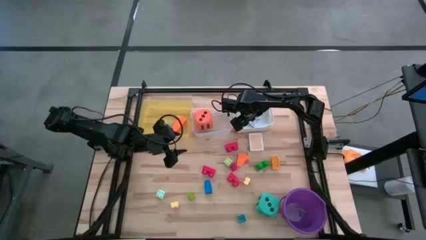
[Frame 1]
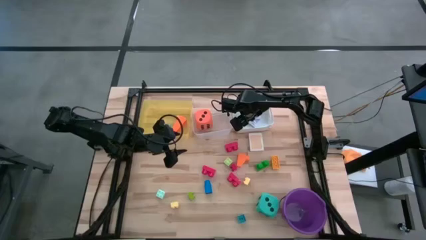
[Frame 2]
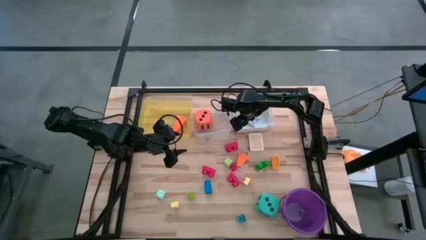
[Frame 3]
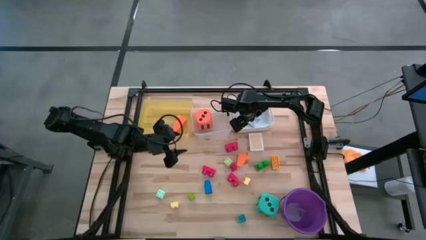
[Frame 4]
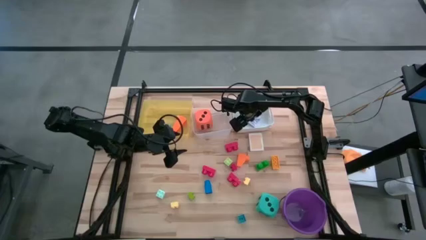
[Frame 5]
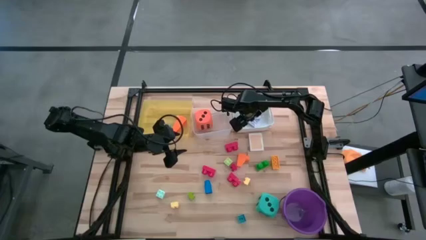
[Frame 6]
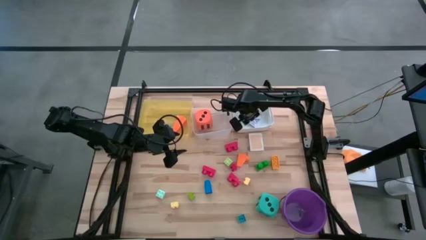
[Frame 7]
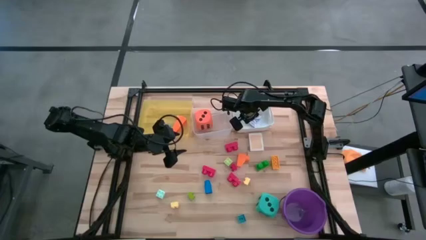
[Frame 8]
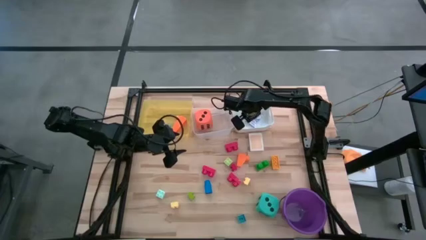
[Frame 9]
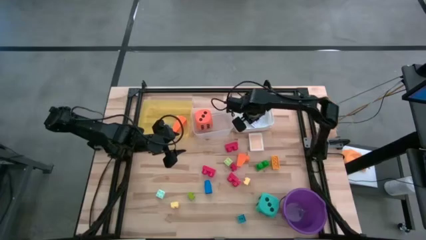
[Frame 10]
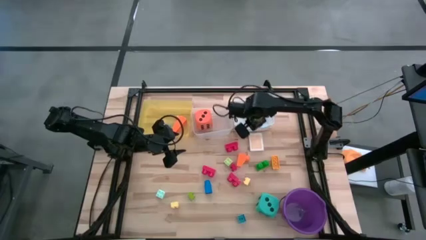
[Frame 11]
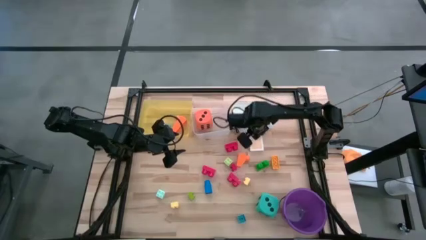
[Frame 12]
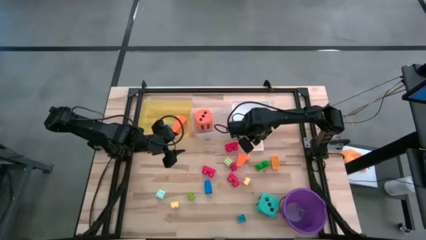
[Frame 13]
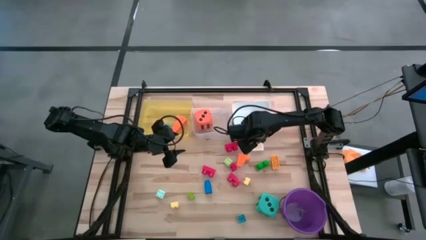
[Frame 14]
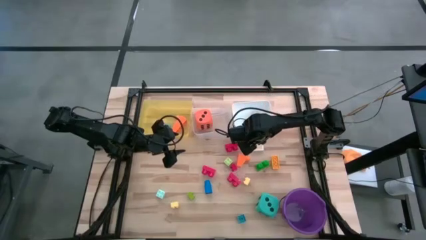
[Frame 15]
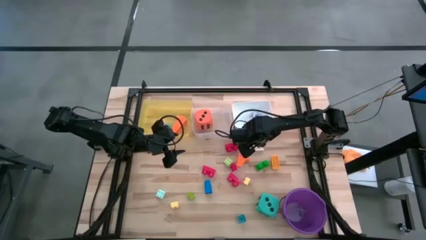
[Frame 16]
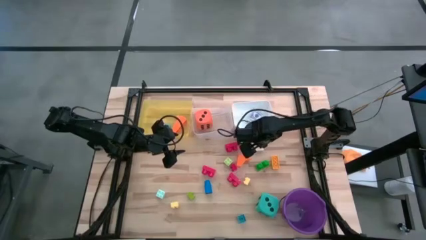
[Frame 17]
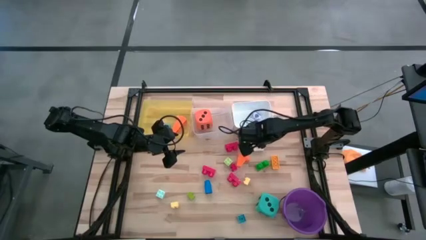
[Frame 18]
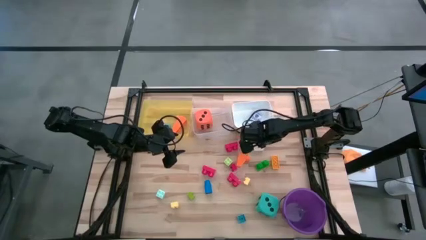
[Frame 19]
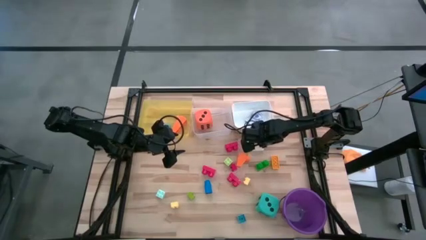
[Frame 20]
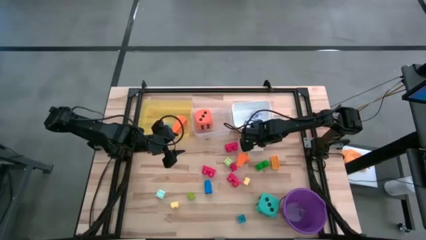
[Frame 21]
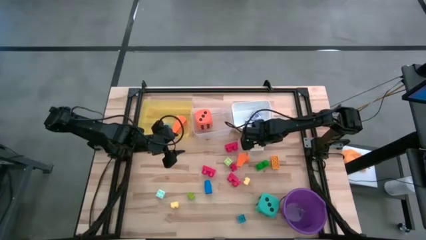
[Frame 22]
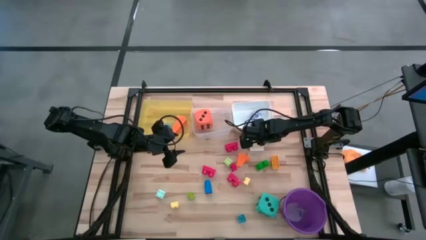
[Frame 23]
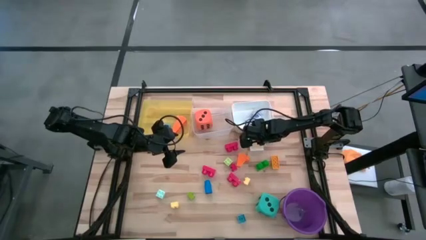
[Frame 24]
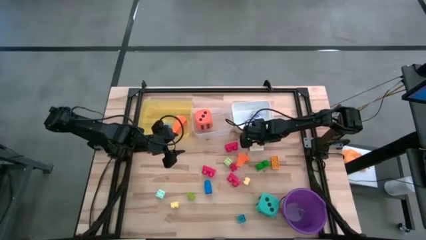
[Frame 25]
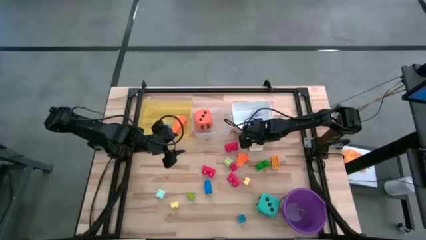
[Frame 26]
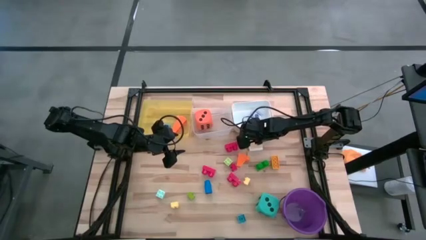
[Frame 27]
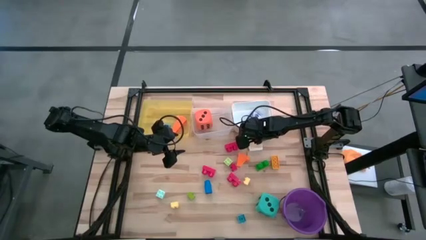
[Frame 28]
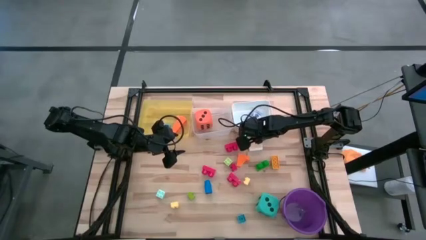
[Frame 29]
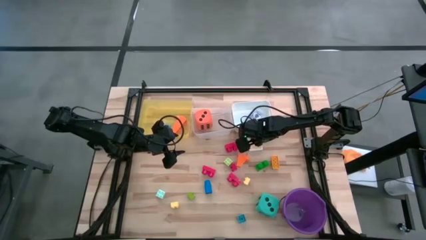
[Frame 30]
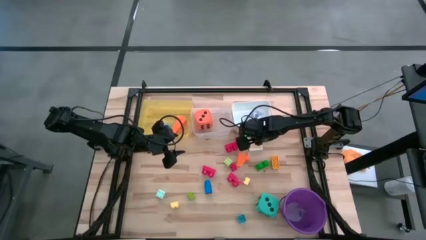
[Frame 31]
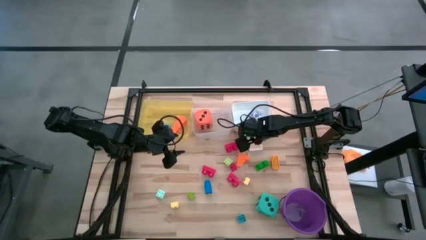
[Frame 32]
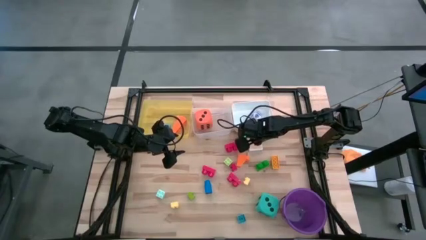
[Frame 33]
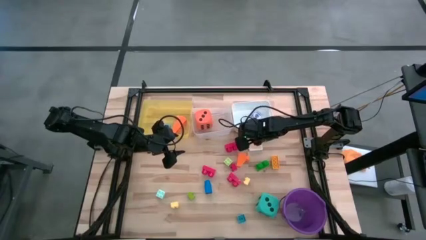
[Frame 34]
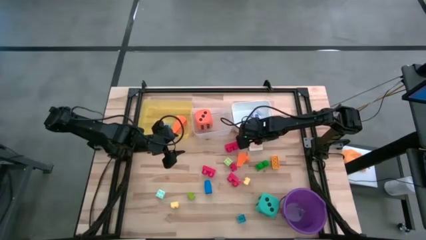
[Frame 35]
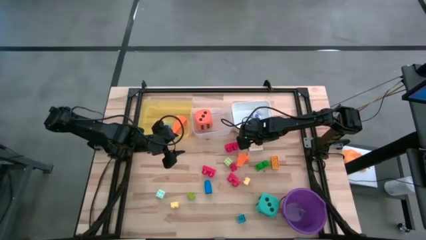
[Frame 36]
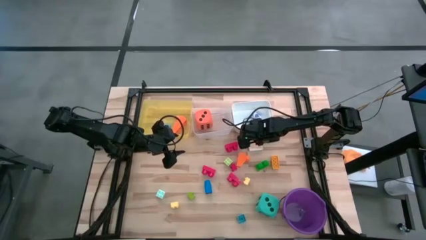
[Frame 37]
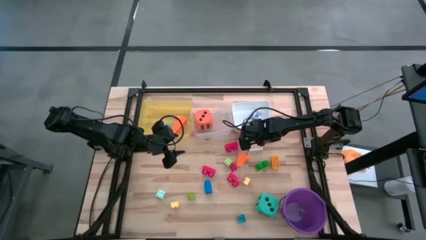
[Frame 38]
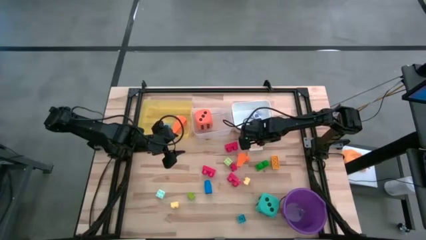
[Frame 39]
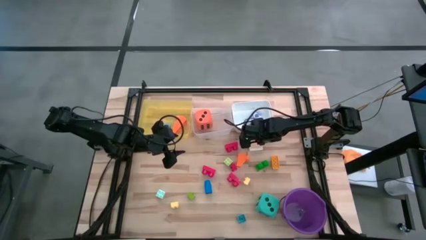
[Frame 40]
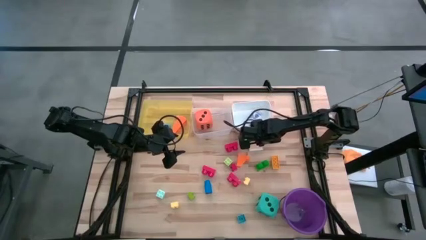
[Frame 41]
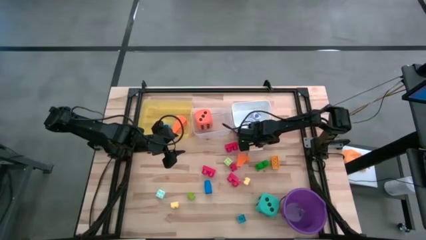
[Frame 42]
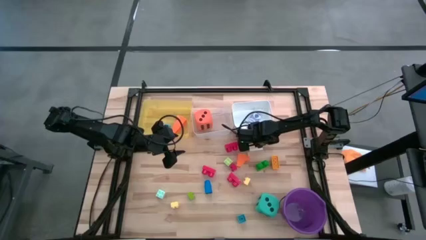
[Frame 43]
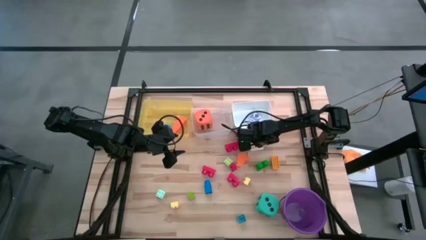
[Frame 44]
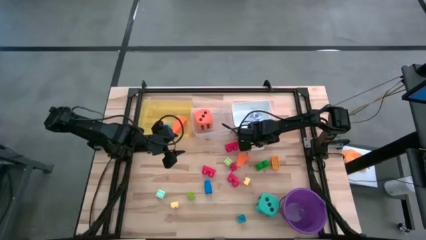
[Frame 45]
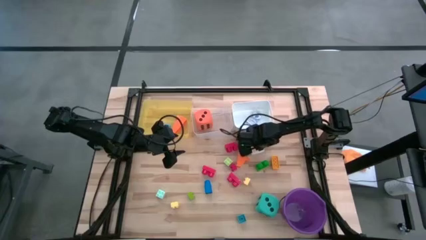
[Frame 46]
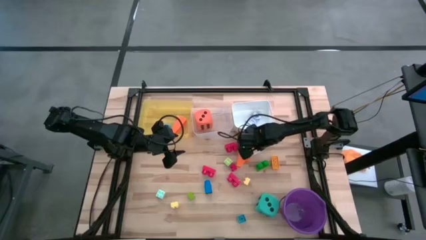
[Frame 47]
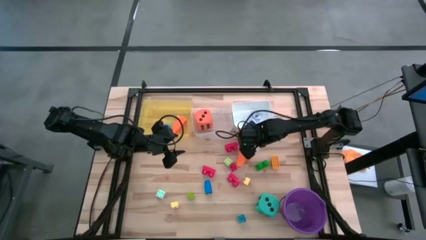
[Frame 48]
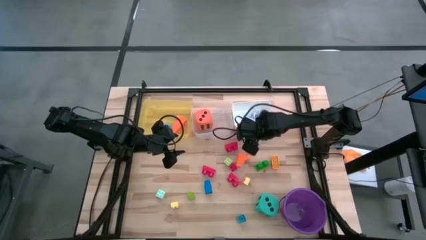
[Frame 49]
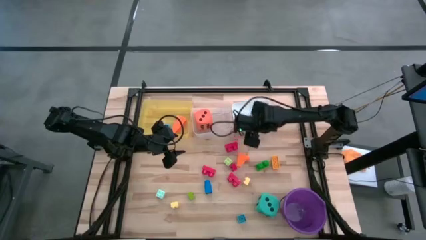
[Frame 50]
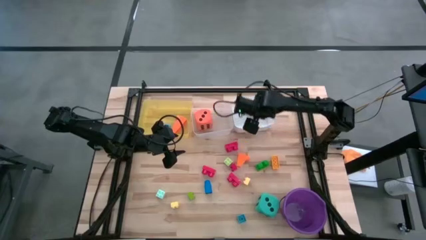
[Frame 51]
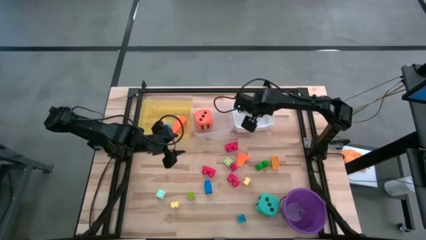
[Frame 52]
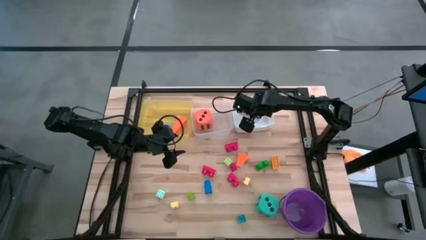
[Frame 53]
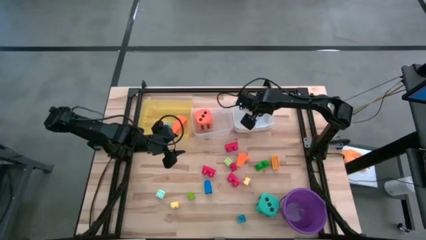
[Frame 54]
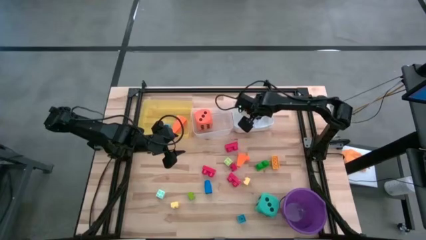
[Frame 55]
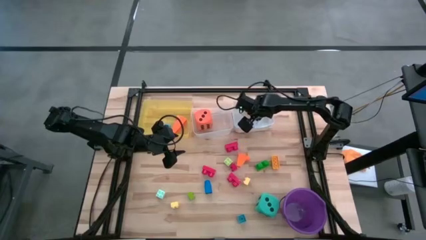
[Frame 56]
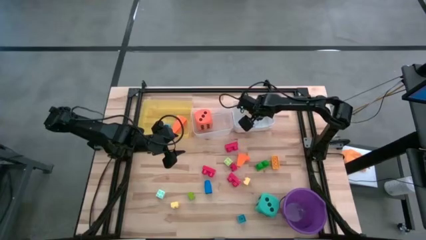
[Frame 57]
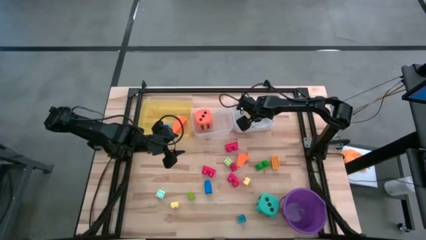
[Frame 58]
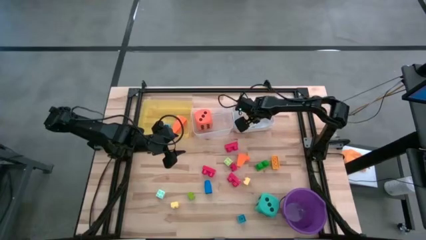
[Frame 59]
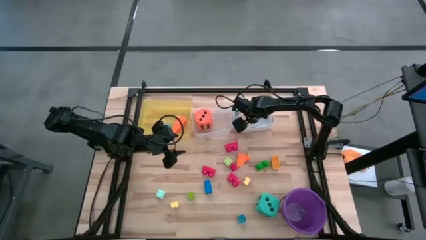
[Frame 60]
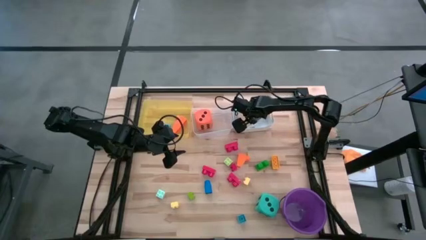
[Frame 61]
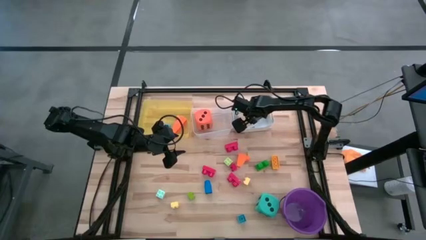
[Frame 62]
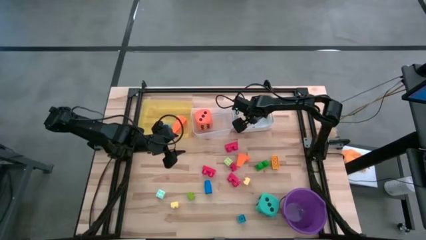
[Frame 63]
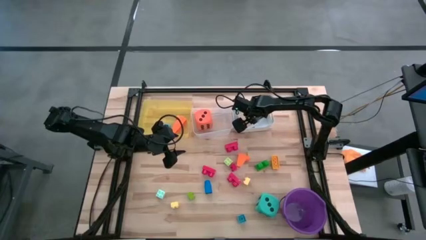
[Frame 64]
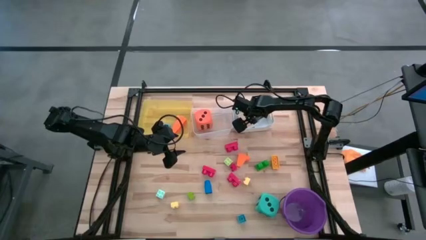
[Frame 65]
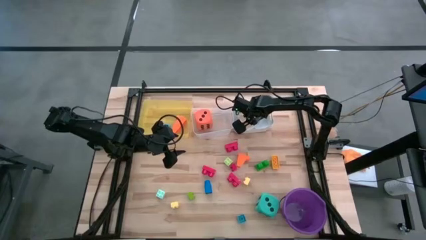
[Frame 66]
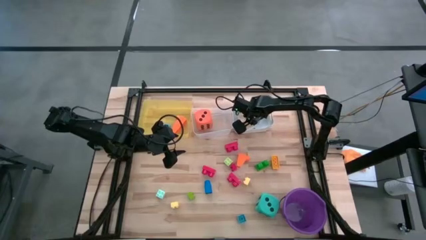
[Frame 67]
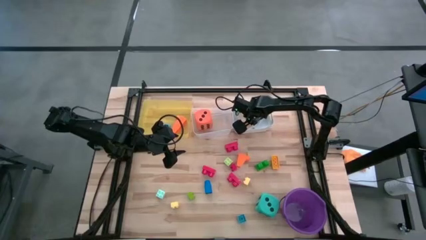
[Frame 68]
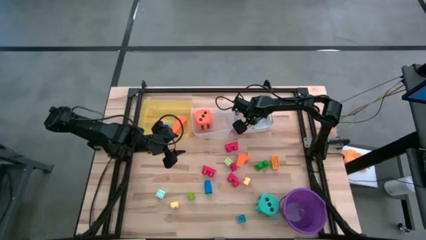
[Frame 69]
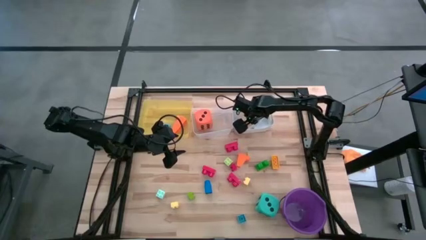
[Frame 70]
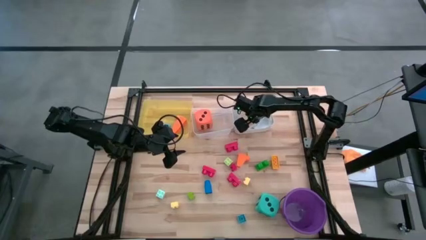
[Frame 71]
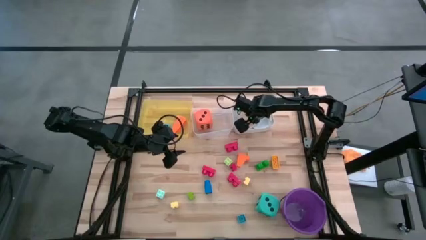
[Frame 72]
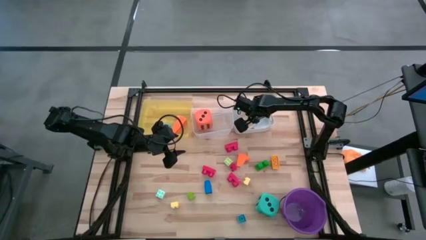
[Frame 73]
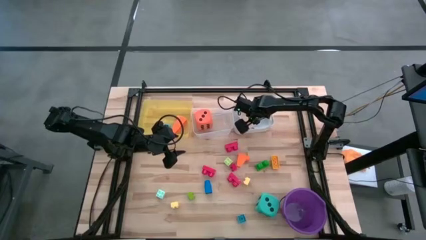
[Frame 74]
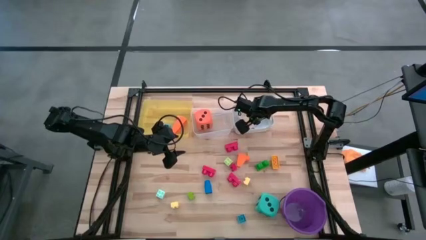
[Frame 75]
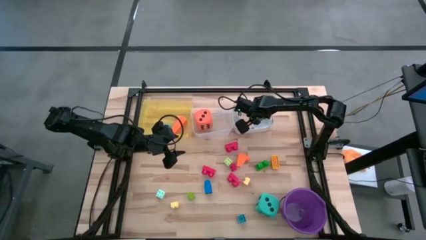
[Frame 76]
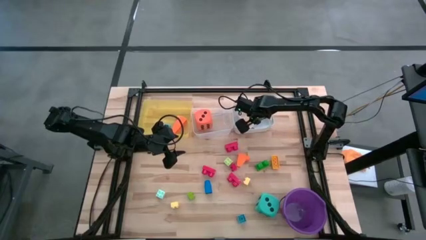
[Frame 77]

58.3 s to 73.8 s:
Task: Pick & Place Toys
Put the orange deck of cards into the white bin
